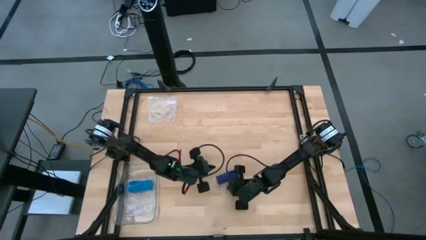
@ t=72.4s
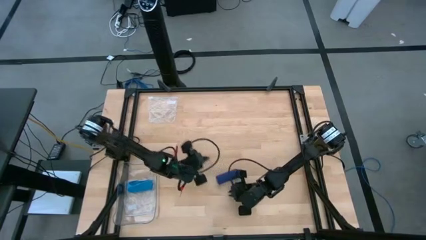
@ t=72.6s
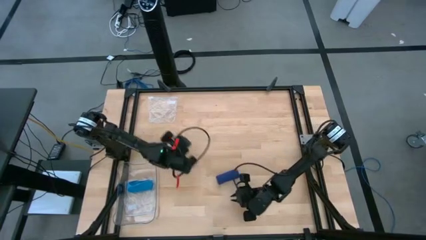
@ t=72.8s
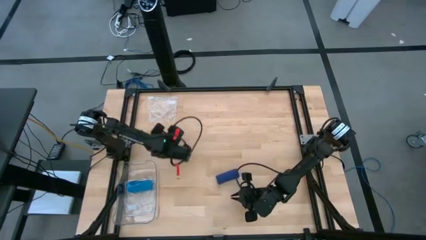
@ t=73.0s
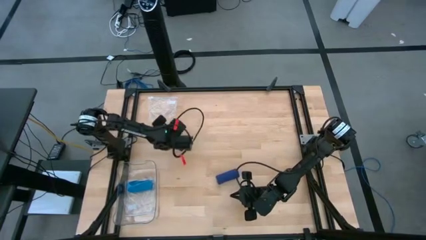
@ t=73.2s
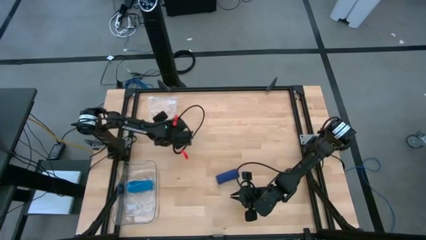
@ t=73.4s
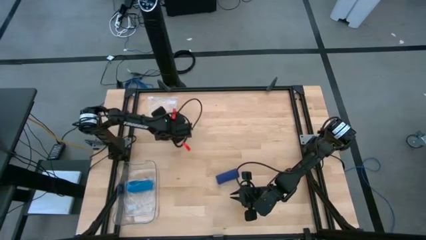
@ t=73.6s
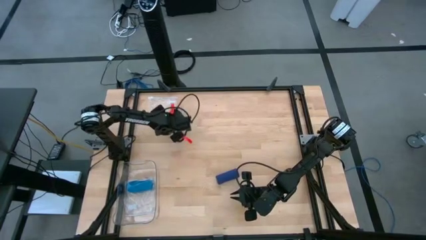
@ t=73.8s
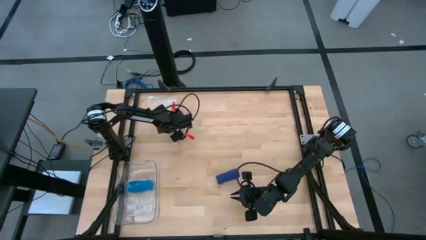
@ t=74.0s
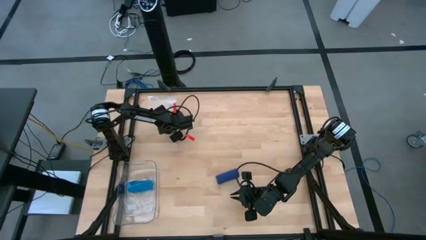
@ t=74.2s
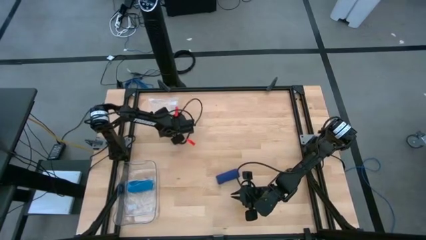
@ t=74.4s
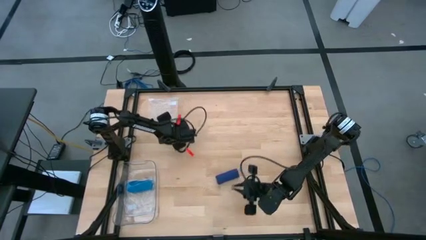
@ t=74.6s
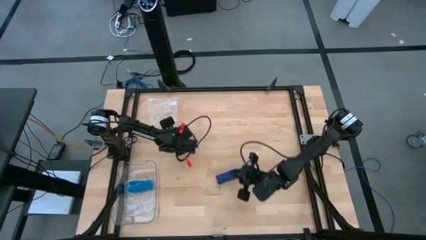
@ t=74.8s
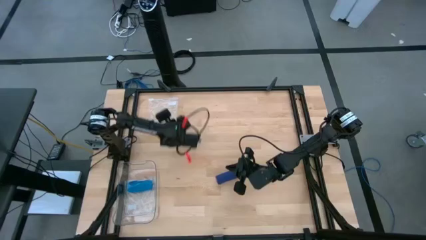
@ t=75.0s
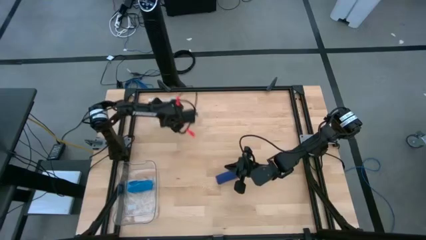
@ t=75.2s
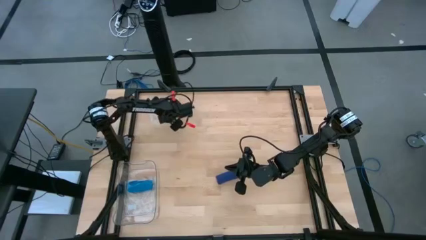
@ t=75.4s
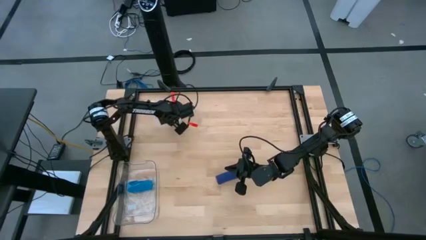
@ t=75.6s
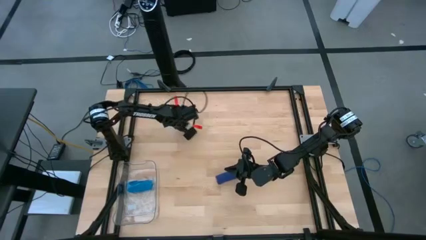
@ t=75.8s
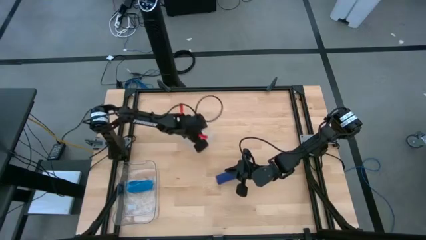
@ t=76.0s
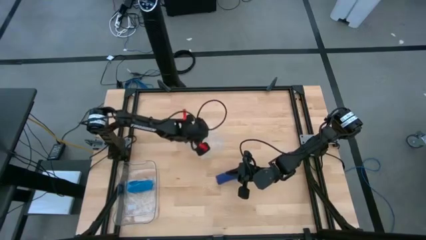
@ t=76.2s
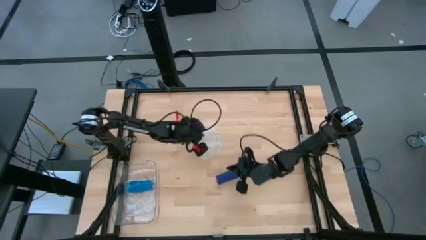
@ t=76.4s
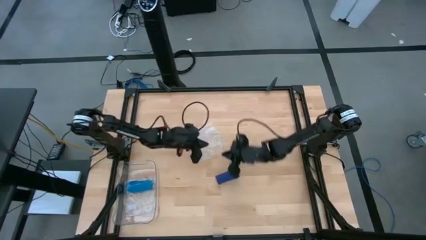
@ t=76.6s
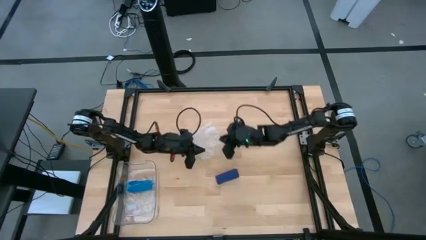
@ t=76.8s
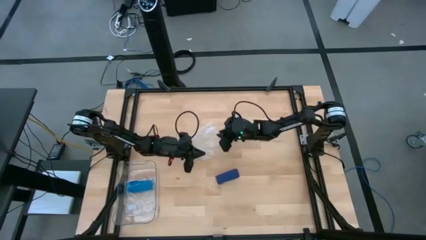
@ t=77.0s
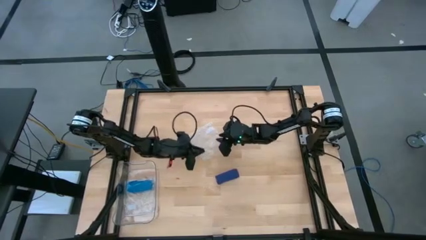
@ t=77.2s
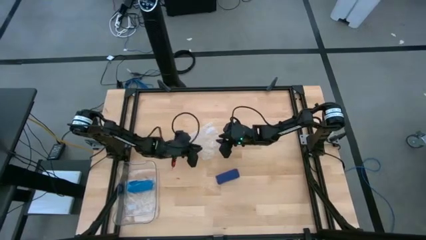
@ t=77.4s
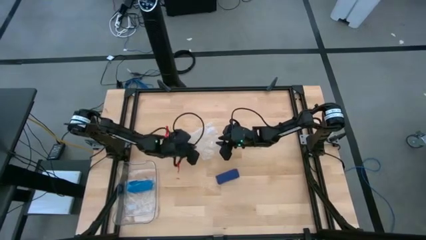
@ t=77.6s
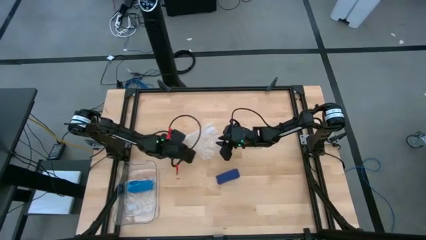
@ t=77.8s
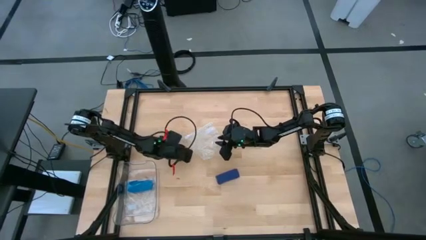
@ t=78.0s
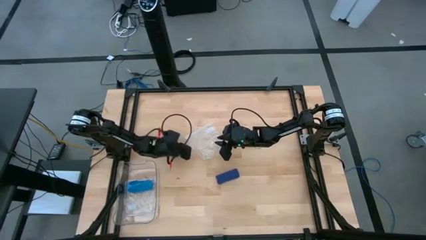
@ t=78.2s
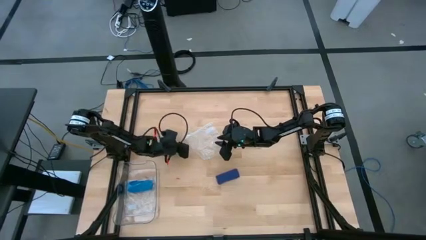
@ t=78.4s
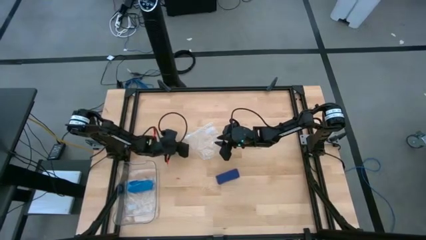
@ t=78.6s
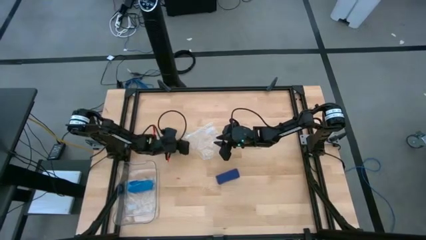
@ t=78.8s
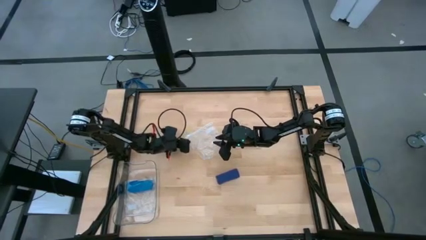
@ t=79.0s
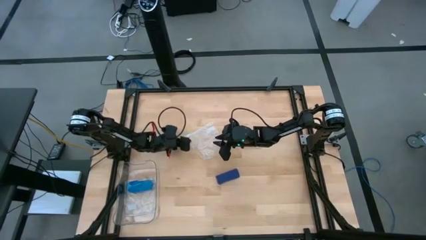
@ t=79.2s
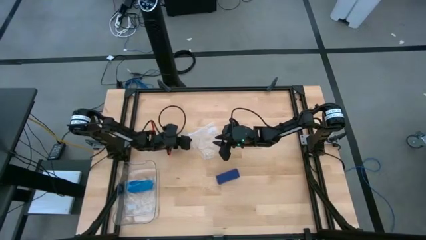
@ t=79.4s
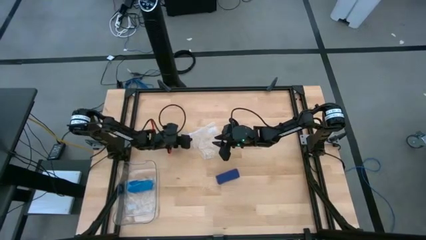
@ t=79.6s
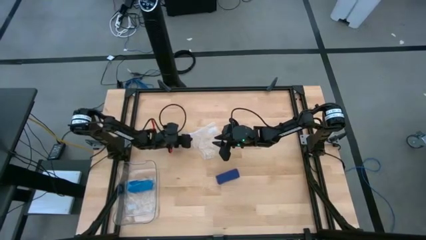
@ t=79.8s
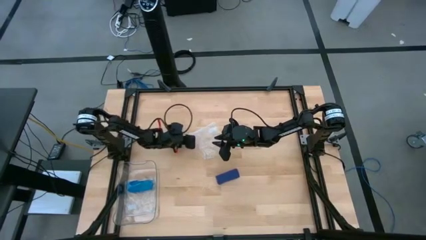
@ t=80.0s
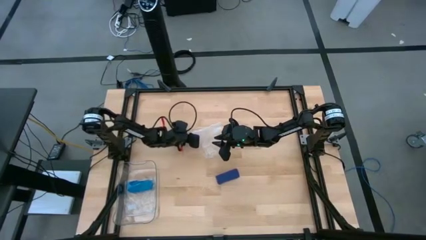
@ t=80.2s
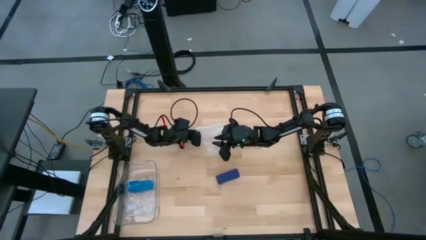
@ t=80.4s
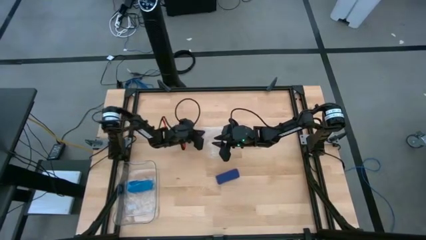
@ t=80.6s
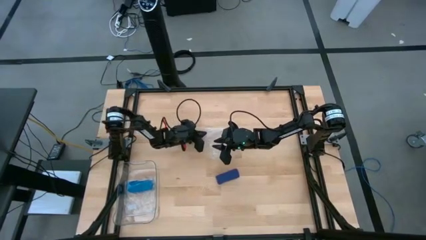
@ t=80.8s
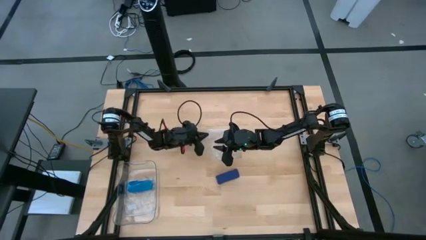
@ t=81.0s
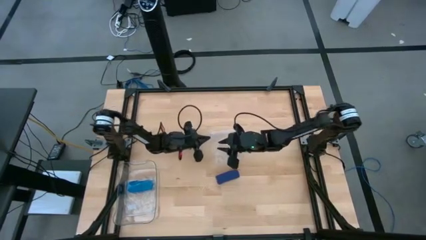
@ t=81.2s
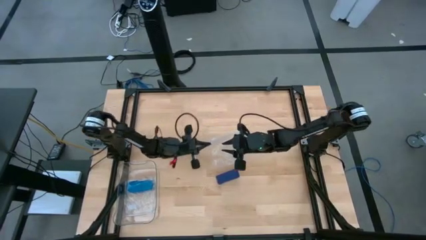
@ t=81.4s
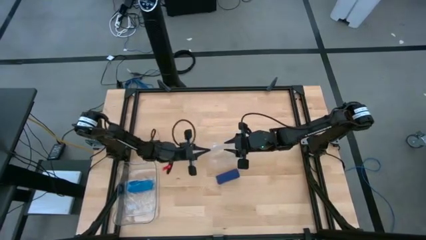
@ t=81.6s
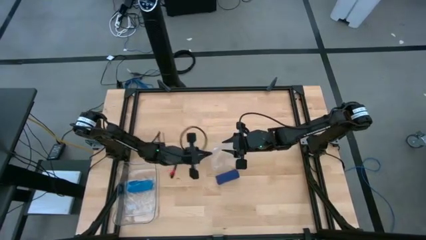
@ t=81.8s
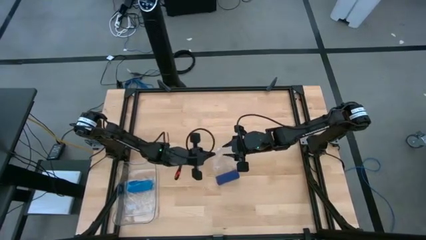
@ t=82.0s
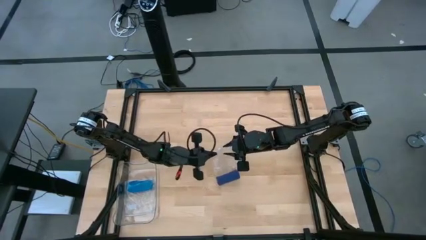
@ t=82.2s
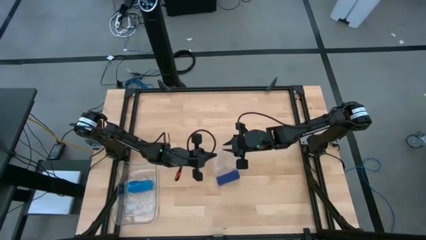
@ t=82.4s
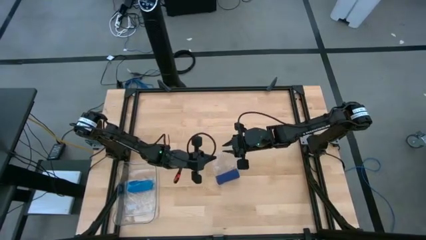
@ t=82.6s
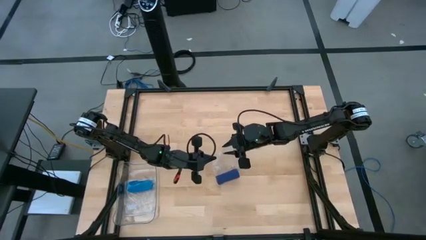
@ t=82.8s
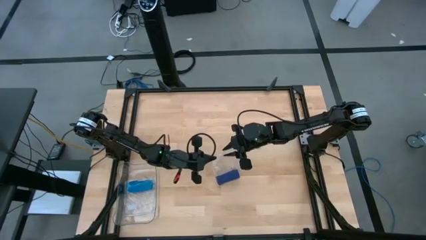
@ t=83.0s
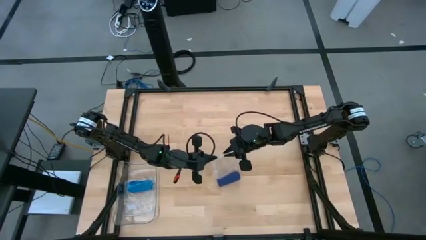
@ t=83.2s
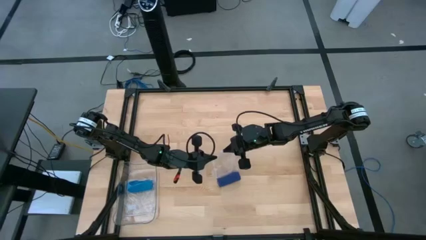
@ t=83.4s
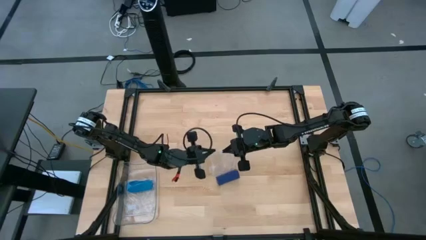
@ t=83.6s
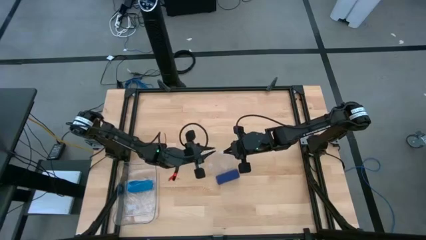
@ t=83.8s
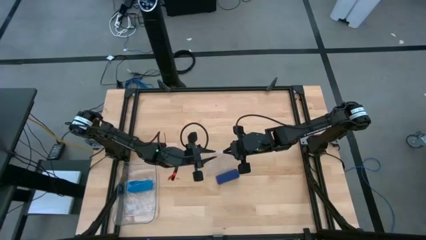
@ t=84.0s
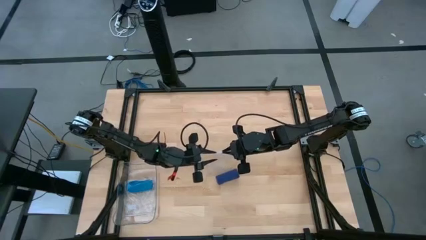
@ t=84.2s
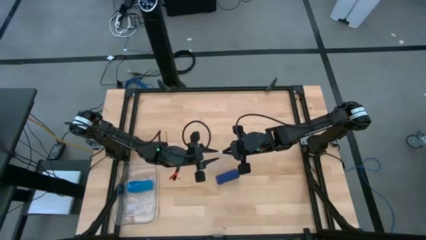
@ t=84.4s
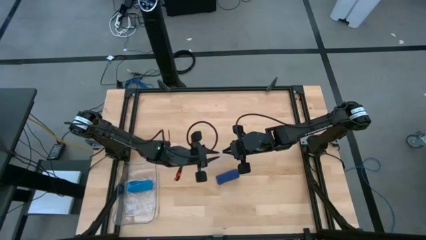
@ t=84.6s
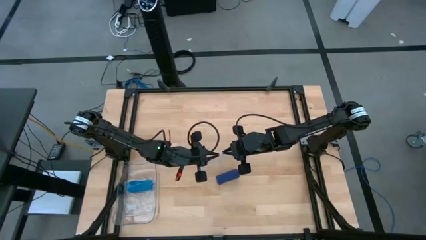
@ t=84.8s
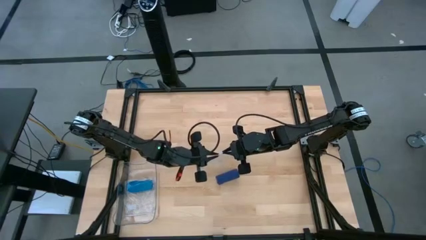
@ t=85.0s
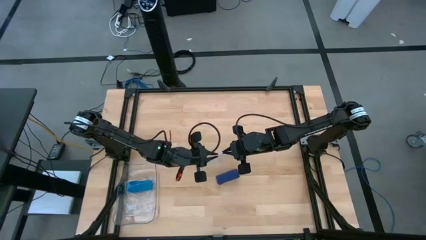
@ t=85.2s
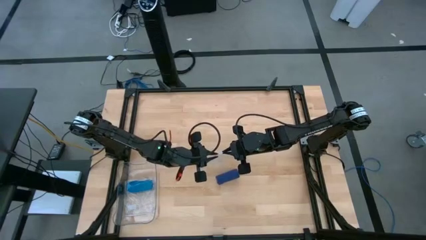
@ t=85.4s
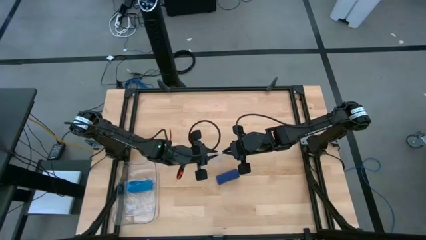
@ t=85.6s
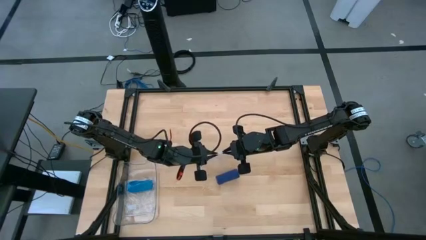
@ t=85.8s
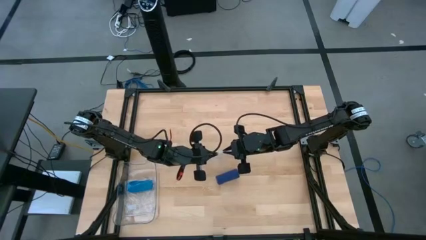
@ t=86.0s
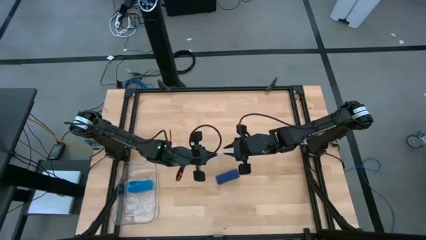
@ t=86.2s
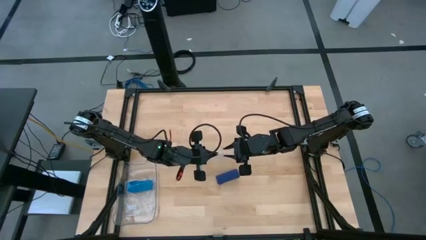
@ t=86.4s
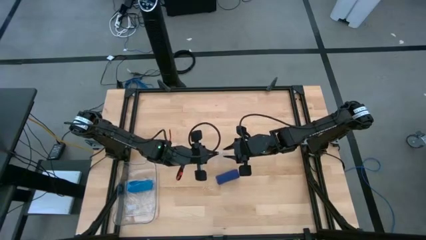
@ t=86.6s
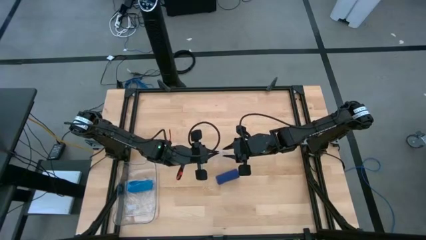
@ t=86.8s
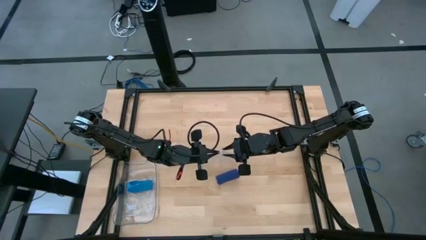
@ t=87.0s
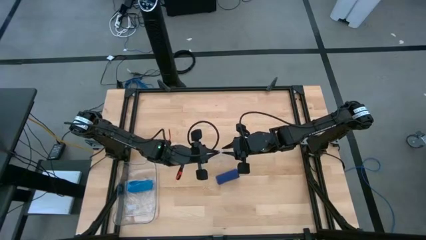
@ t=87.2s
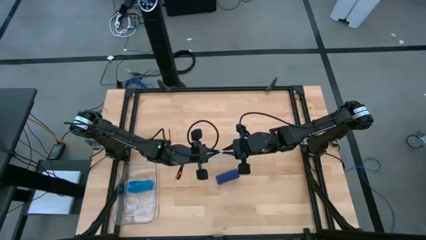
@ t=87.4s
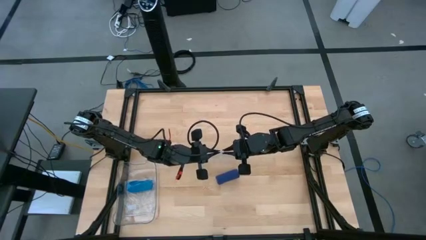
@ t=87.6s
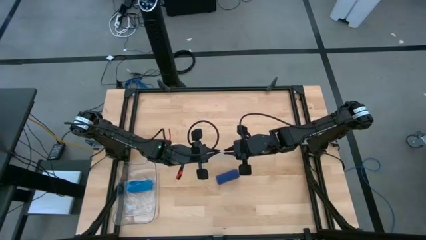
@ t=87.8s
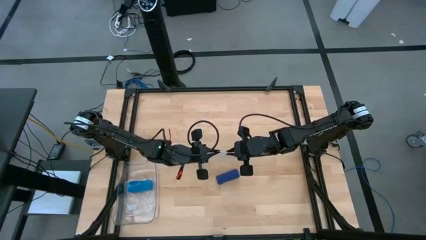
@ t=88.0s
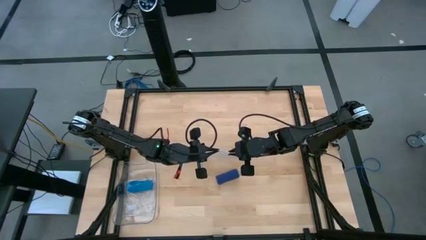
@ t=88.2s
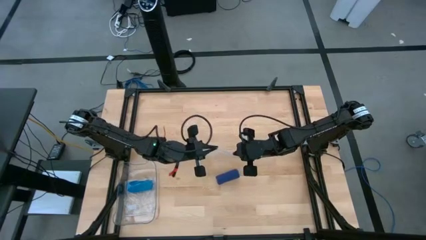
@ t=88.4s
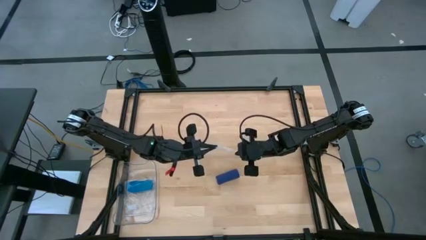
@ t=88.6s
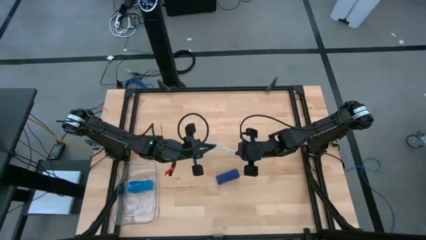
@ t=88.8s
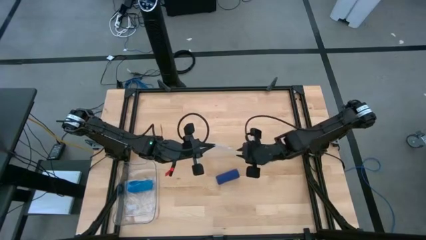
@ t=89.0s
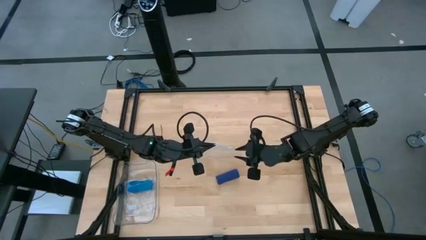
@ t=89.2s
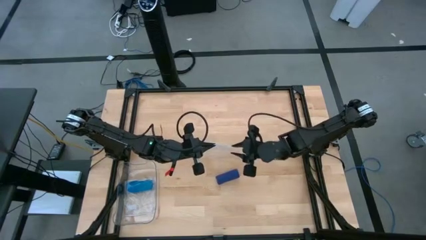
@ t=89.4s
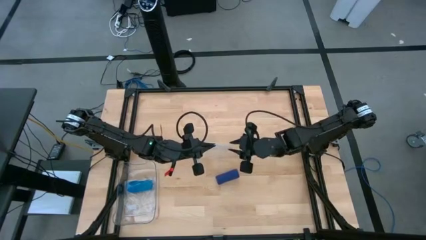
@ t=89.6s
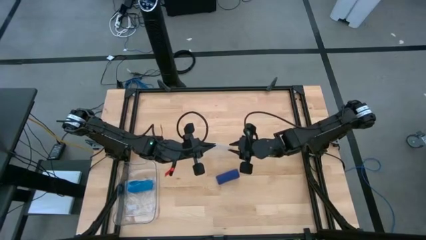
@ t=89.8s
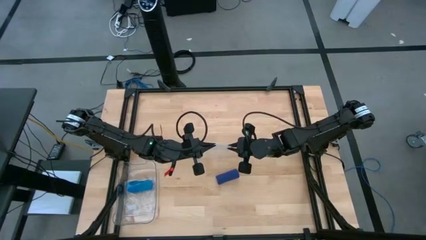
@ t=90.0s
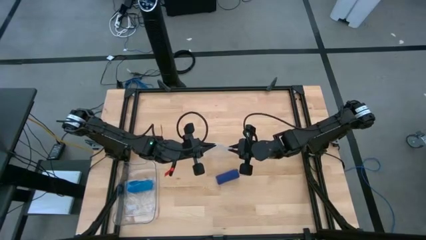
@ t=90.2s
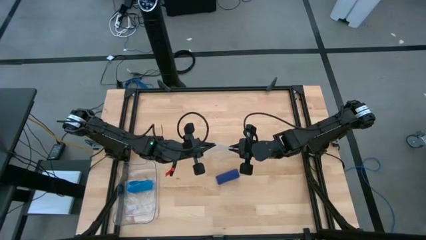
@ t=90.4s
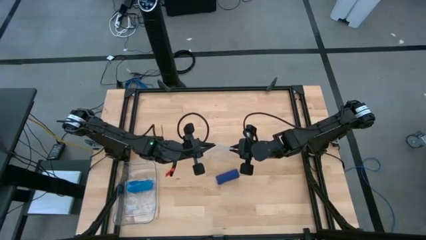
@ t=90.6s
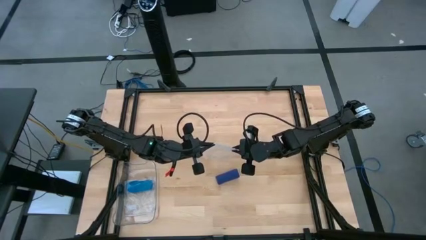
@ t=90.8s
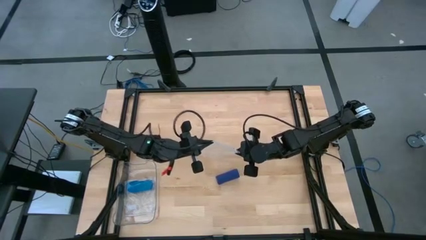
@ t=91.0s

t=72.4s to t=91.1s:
Task: Roll bandage
Open the transparent zip bag
